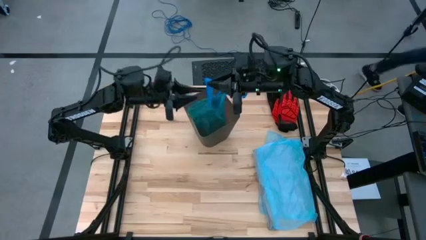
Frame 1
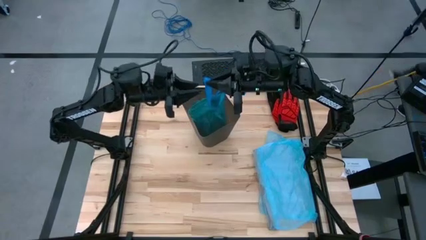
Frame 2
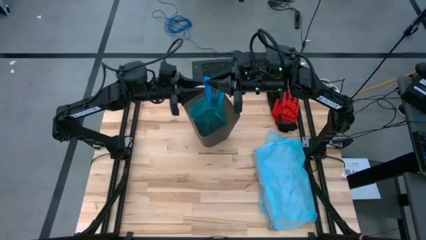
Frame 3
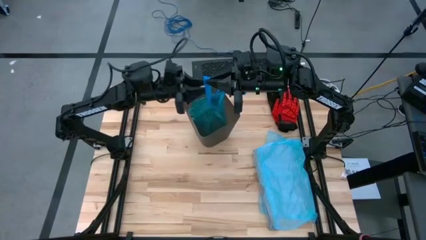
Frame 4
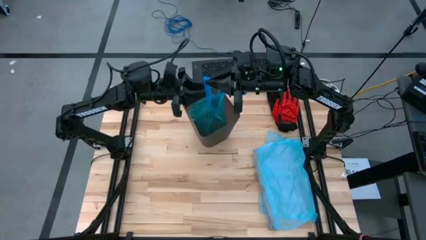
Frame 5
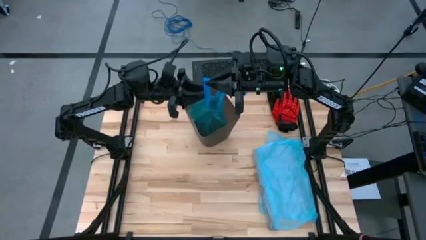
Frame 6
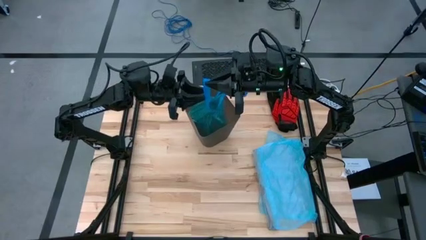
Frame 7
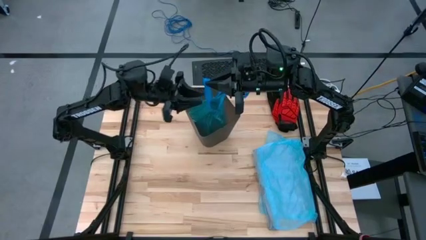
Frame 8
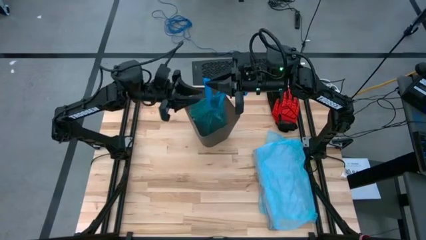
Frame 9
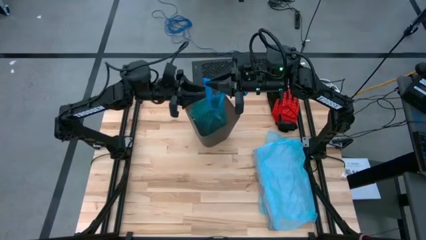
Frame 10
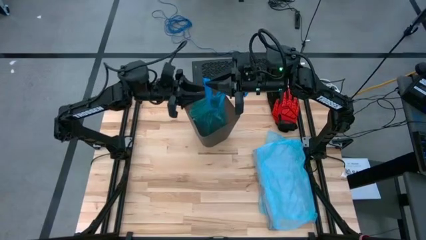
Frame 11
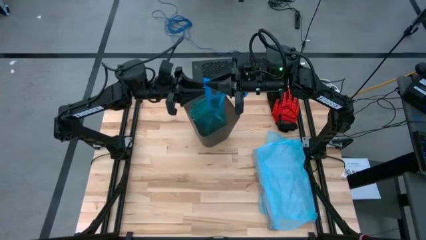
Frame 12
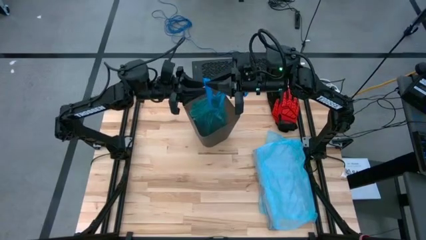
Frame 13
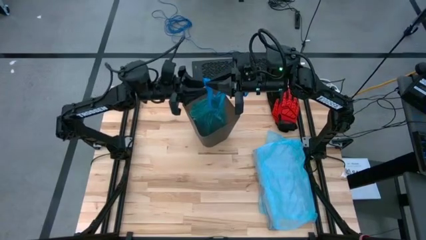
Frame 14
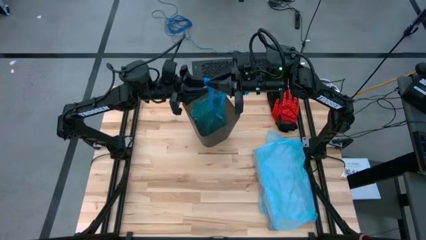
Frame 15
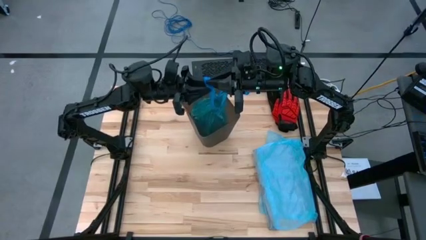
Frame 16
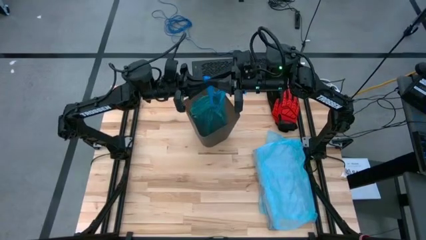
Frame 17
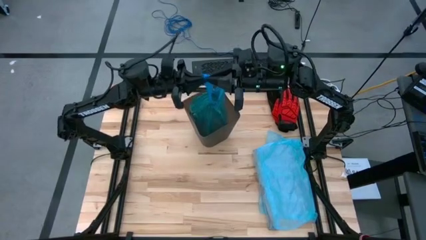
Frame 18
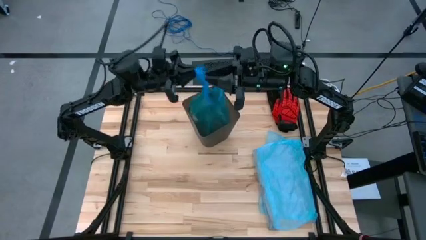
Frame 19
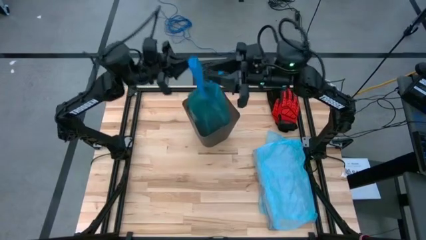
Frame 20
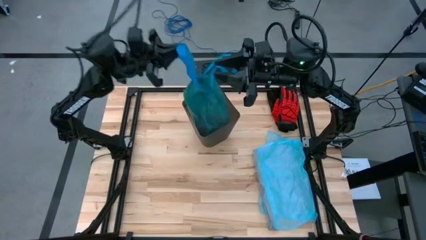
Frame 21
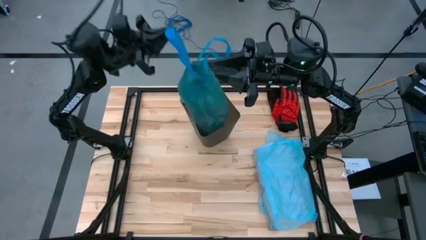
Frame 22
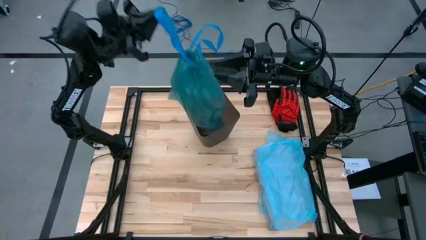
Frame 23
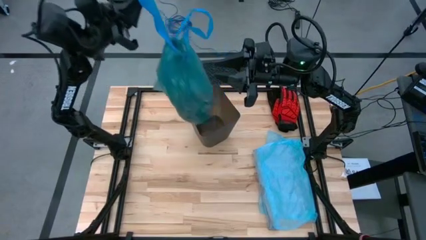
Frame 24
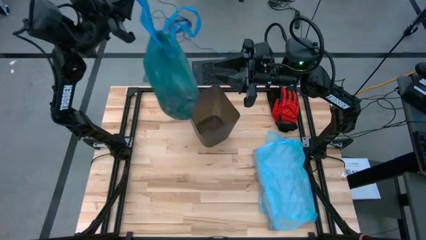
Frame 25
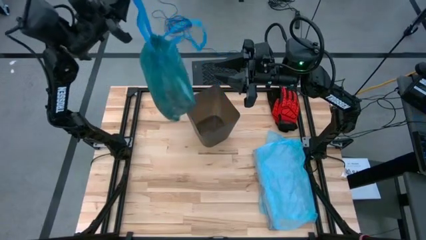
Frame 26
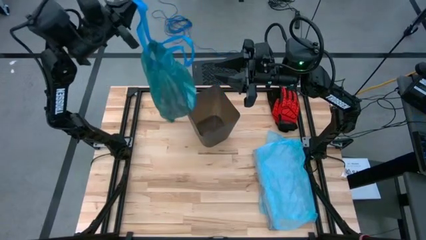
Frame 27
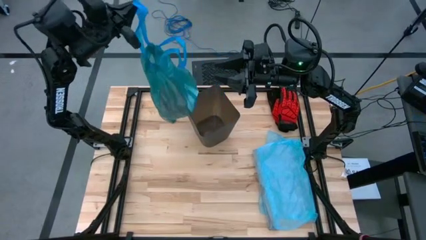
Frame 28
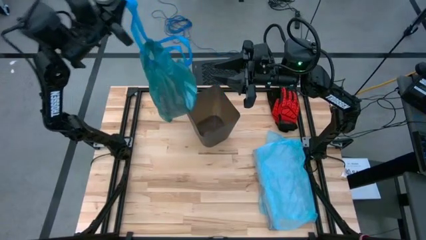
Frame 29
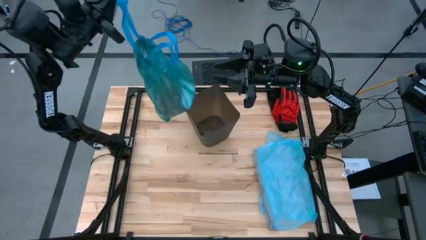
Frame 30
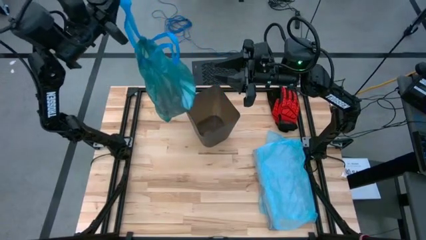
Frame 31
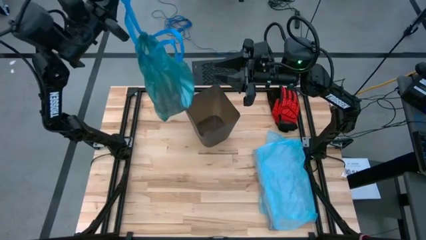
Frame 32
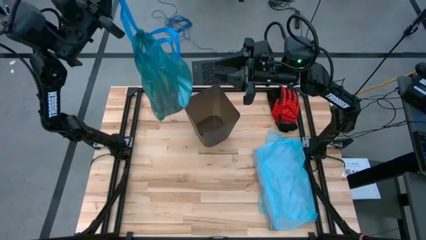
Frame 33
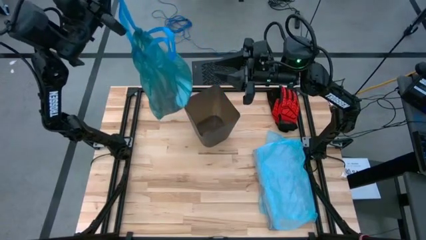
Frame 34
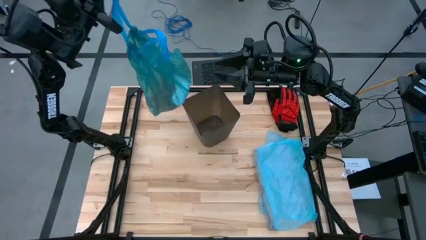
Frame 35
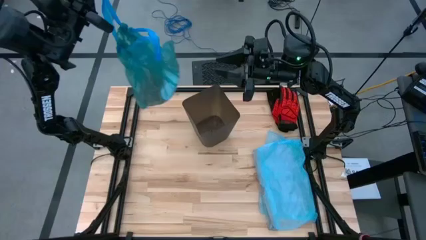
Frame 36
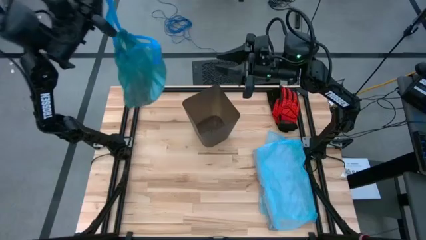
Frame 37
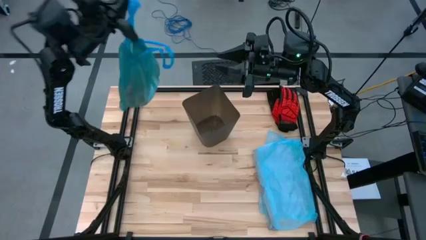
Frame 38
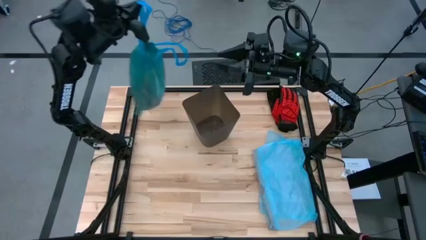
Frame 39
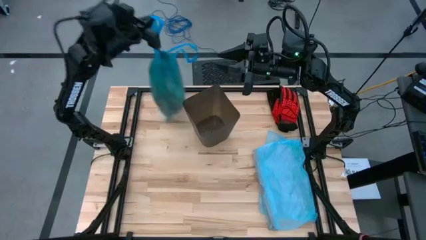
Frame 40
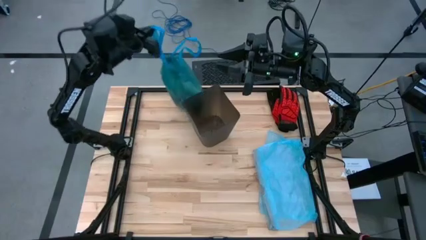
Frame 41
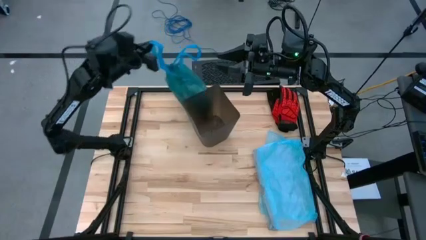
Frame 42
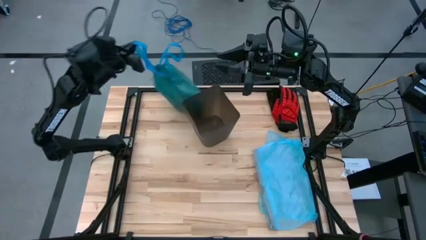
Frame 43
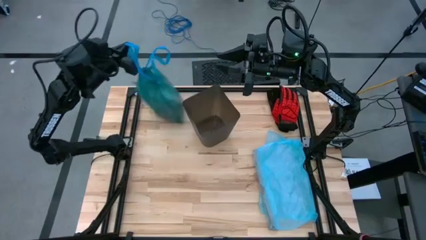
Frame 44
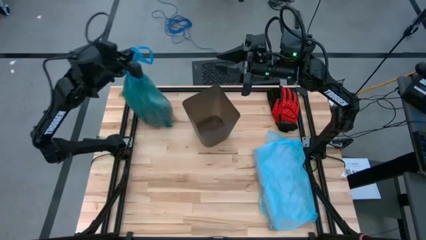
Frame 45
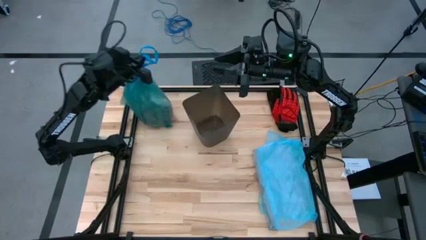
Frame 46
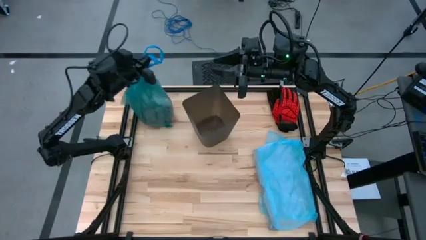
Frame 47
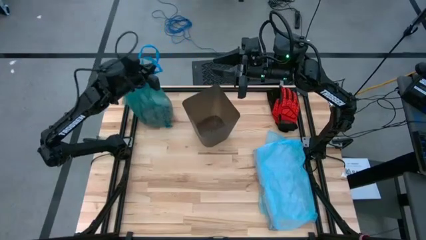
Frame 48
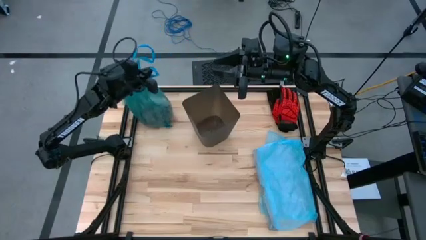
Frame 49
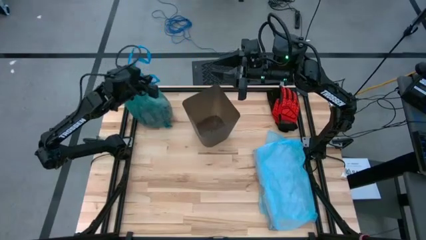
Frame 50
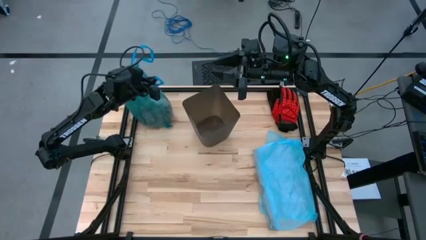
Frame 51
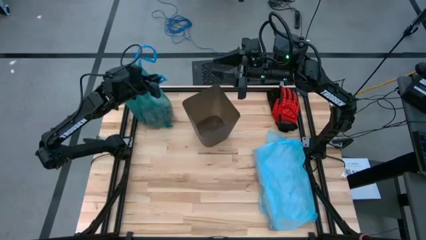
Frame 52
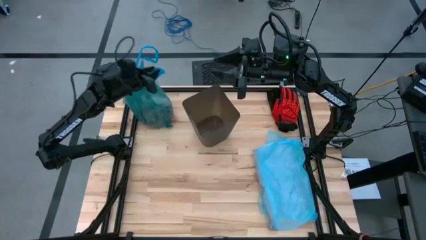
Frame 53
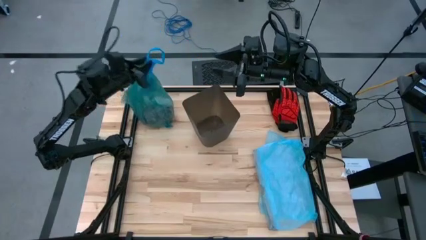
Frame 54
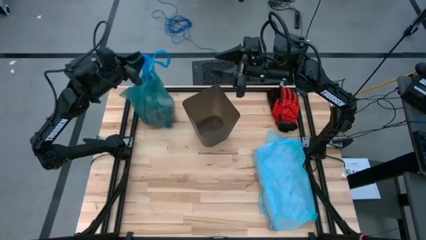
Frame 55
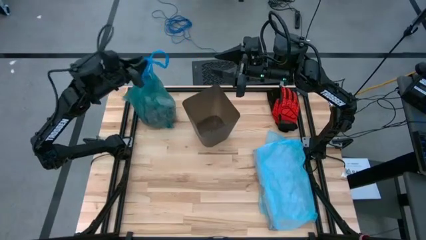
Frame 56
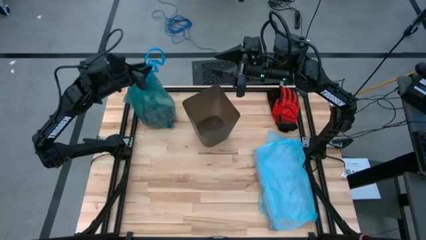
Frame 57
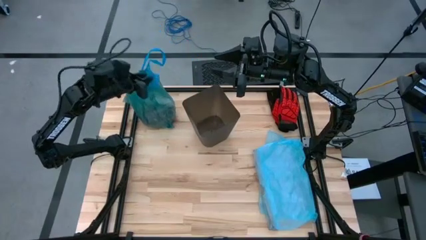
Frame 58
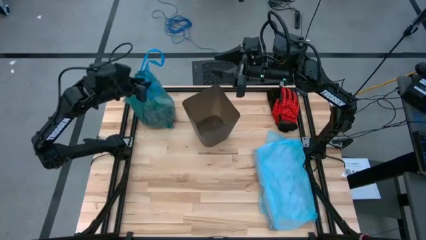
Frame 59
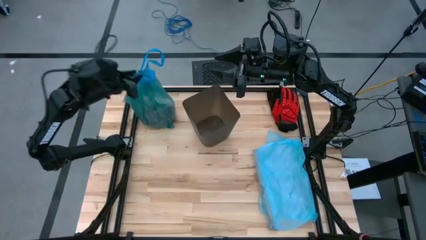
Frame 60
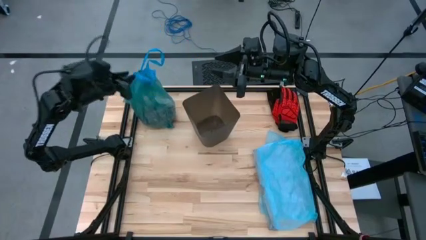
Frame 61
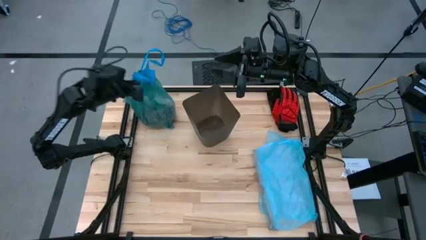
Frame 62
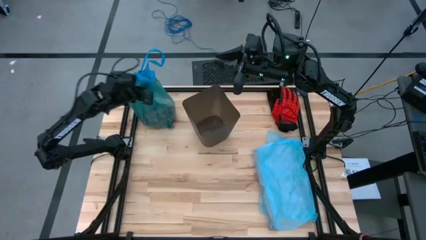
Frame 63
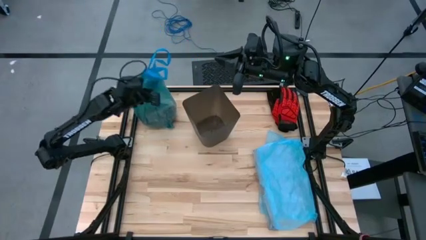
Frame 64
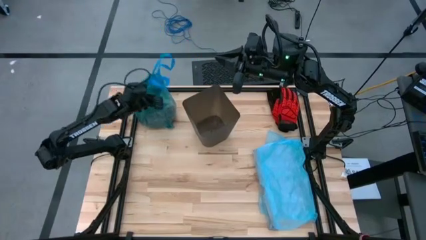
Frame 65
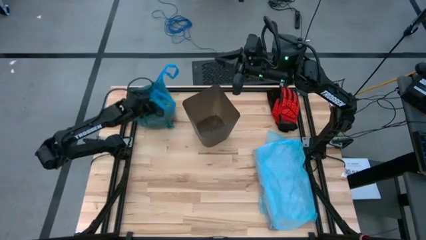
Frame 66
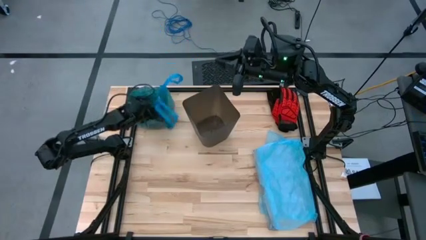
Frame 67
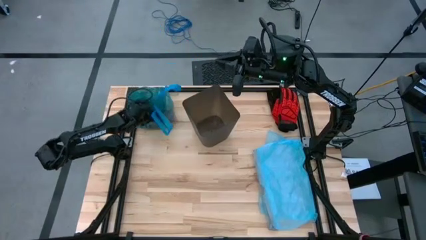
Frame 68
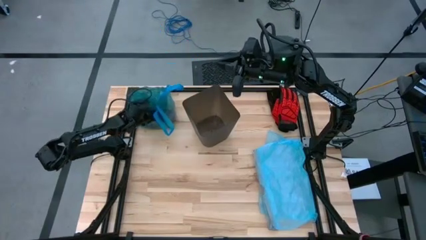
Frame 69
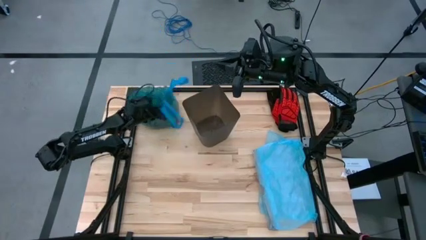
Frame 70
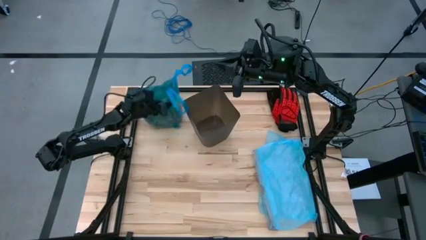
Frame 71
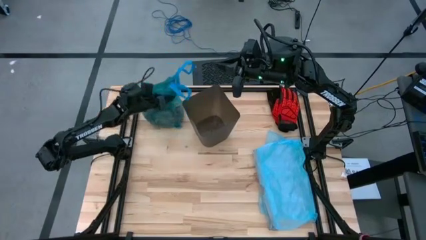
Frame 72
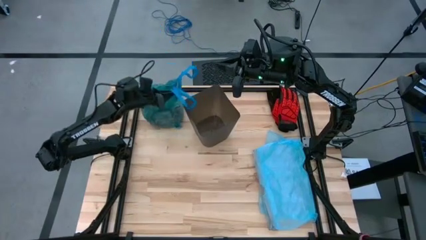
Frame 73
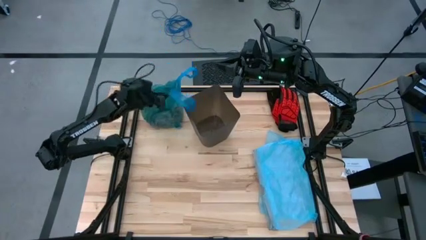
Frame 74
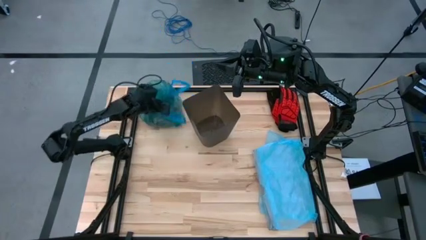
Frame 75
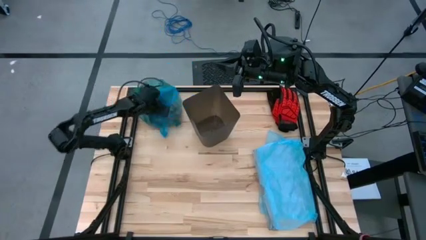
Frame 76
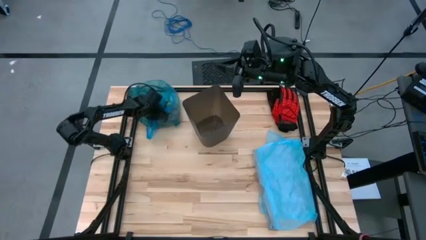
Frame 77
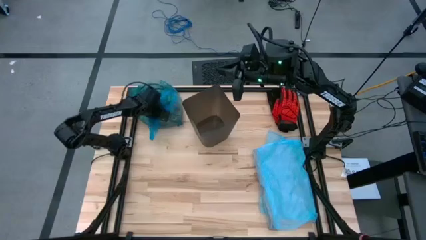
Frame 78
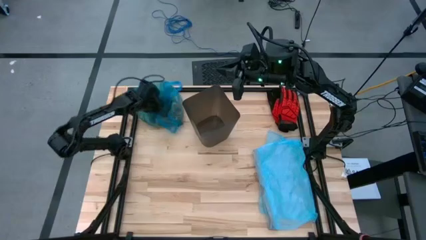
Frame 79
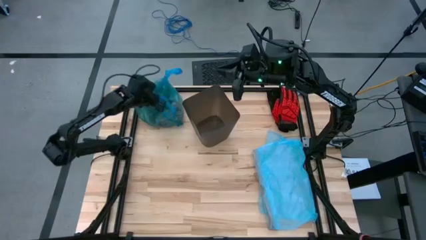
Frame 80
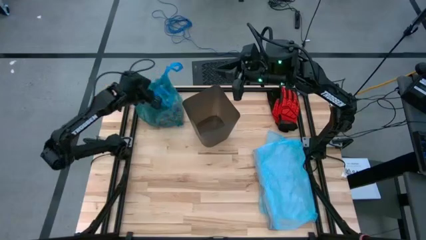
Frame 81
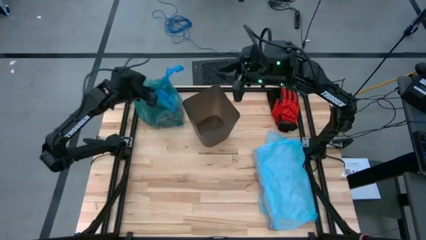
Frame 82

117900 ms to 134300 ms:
Task: place trash/remove bag and relplace
Remove the blue trash bag from the trash bin
